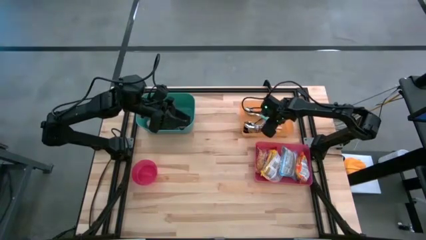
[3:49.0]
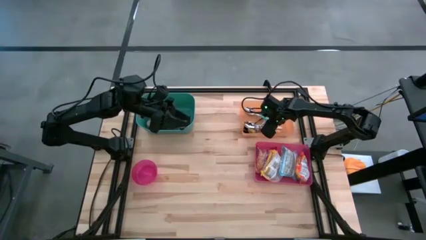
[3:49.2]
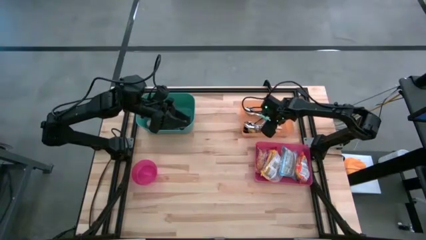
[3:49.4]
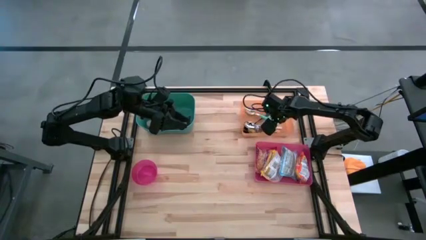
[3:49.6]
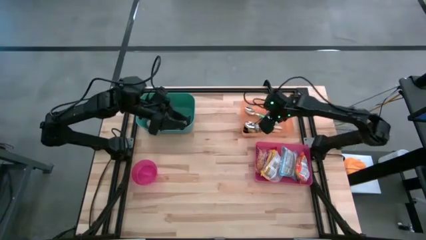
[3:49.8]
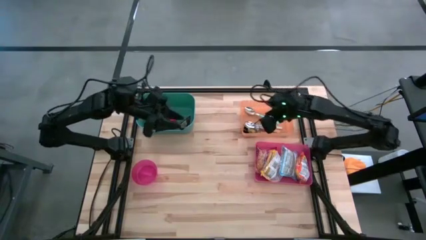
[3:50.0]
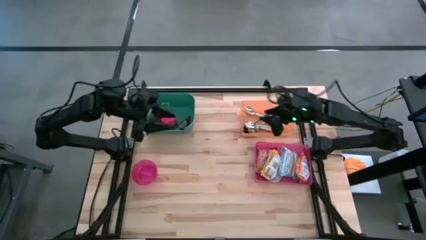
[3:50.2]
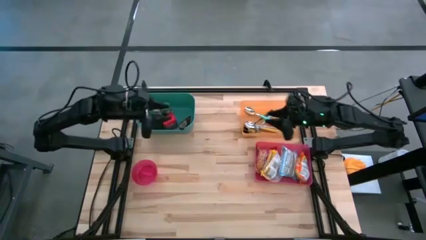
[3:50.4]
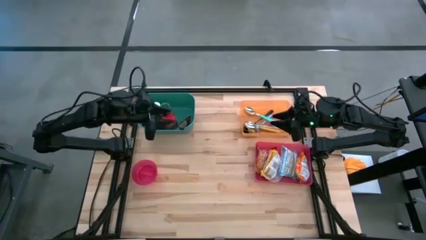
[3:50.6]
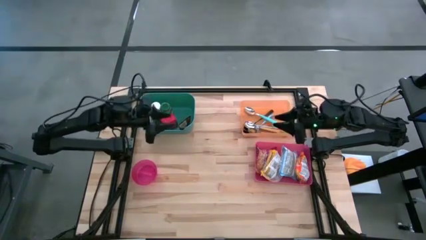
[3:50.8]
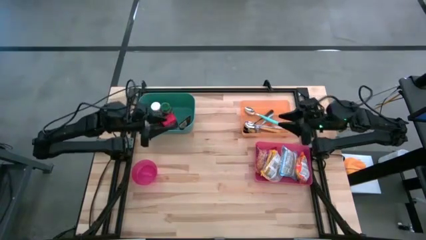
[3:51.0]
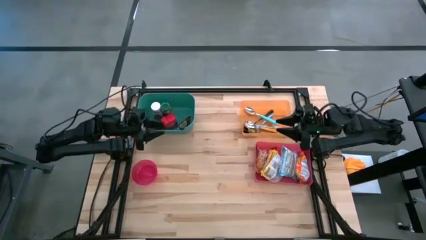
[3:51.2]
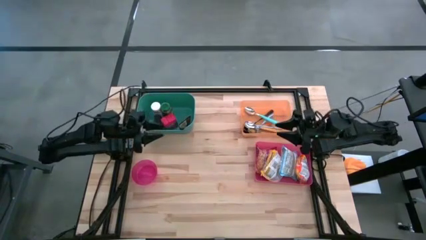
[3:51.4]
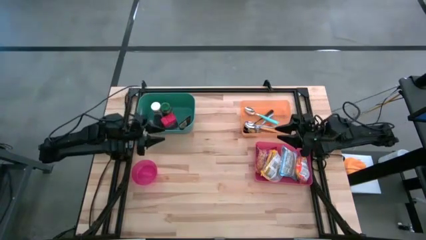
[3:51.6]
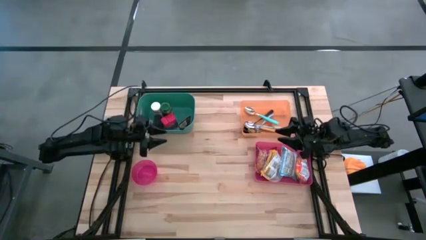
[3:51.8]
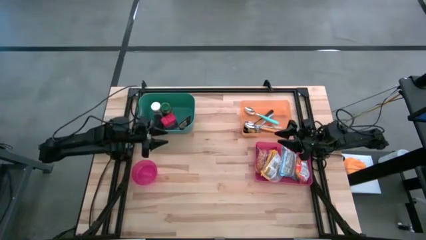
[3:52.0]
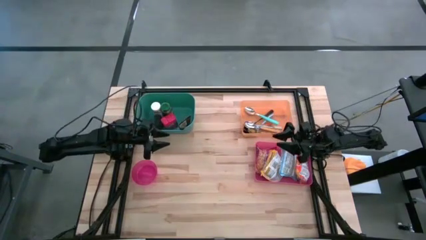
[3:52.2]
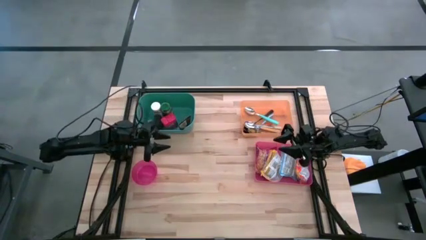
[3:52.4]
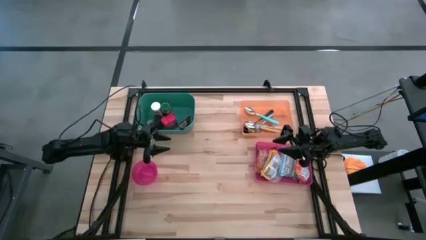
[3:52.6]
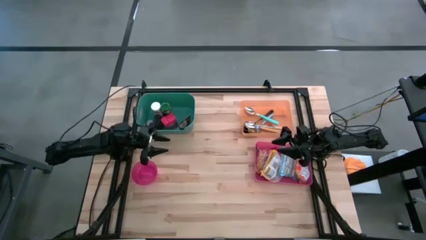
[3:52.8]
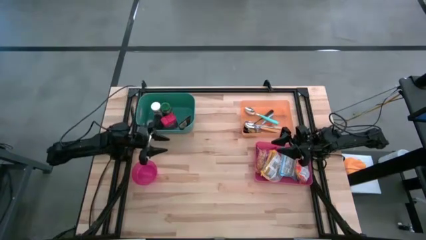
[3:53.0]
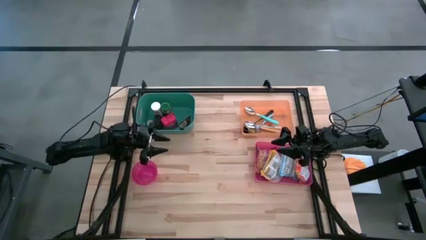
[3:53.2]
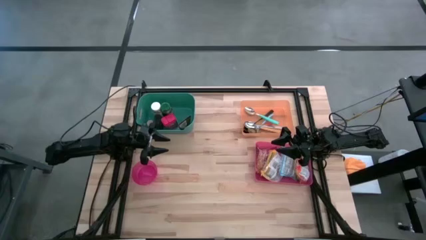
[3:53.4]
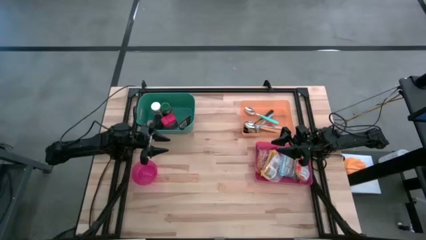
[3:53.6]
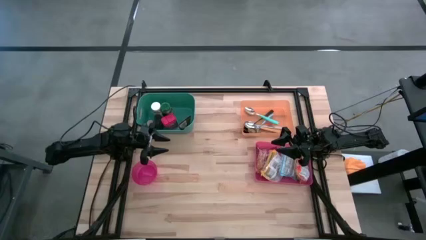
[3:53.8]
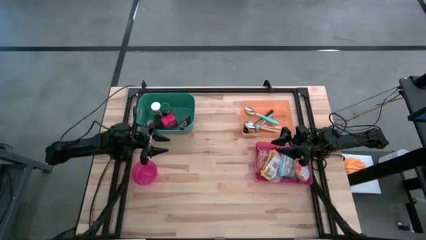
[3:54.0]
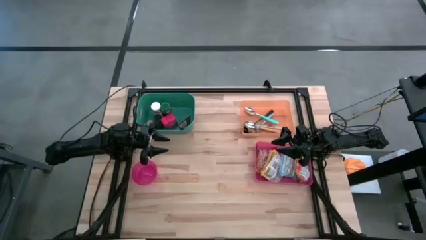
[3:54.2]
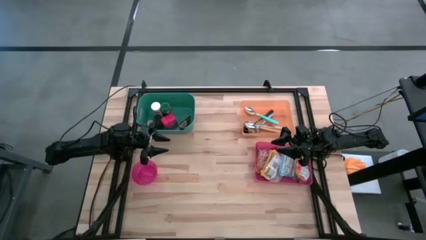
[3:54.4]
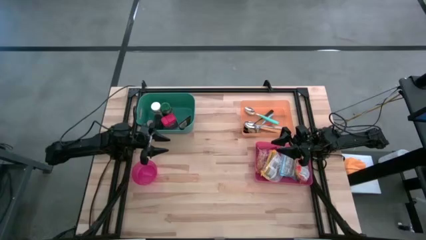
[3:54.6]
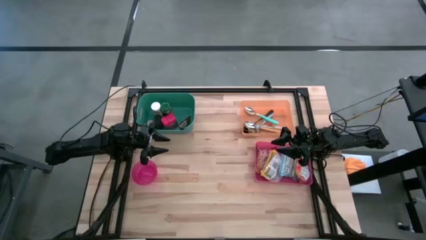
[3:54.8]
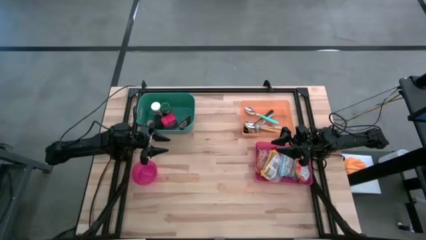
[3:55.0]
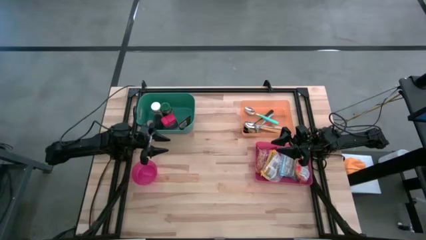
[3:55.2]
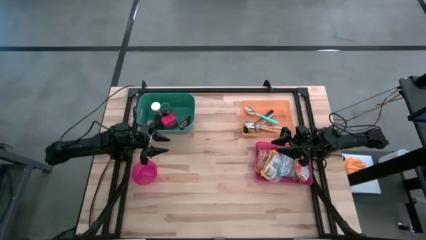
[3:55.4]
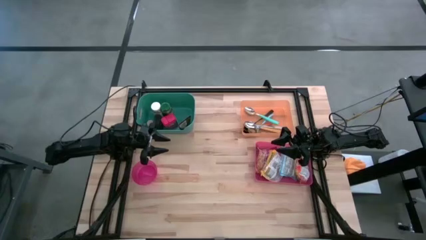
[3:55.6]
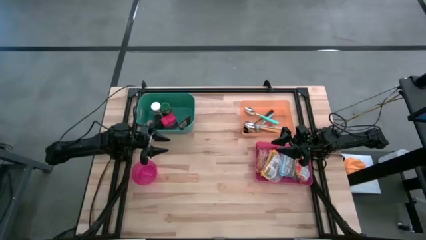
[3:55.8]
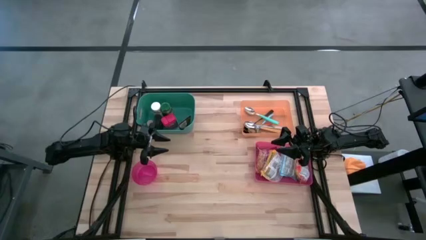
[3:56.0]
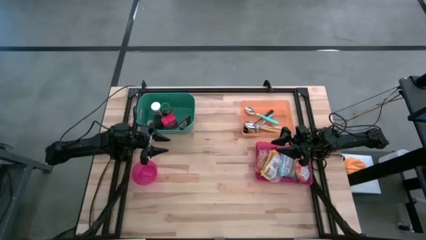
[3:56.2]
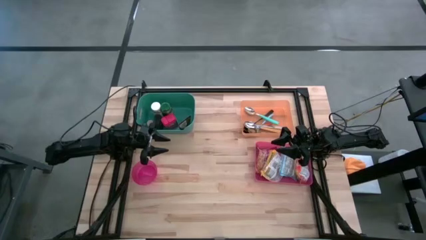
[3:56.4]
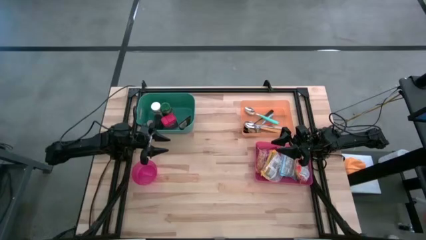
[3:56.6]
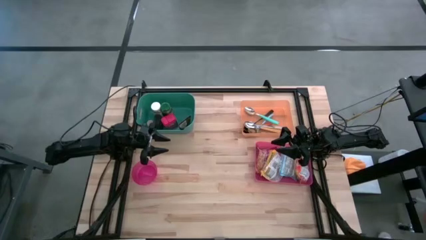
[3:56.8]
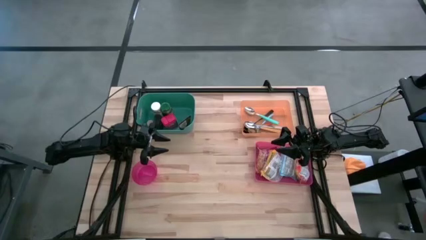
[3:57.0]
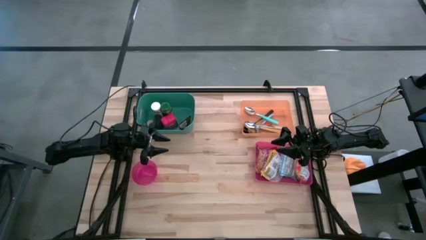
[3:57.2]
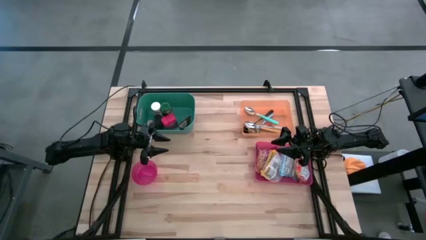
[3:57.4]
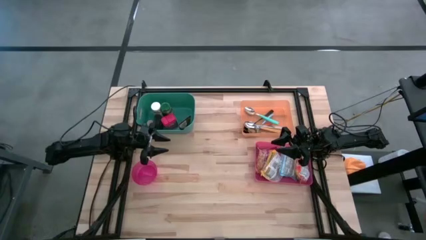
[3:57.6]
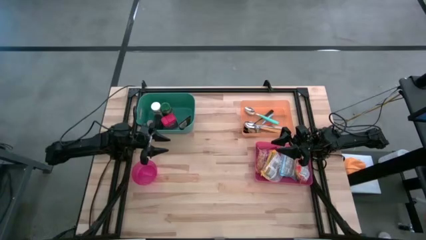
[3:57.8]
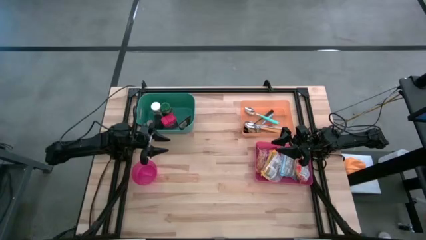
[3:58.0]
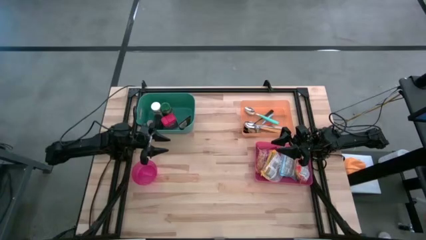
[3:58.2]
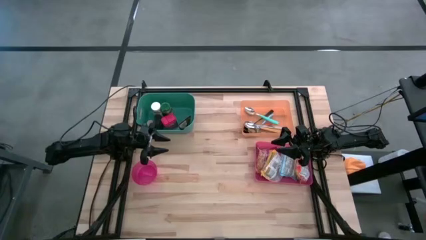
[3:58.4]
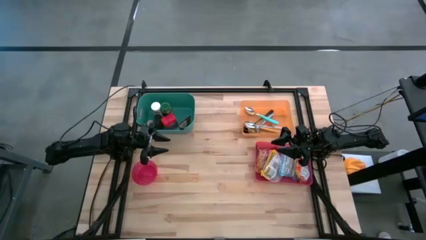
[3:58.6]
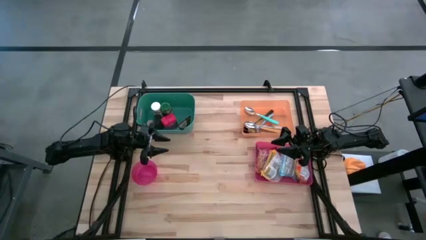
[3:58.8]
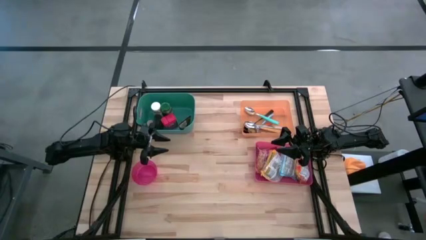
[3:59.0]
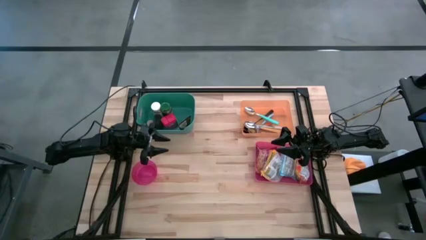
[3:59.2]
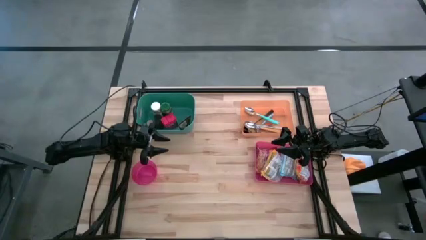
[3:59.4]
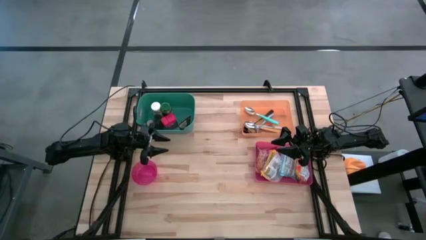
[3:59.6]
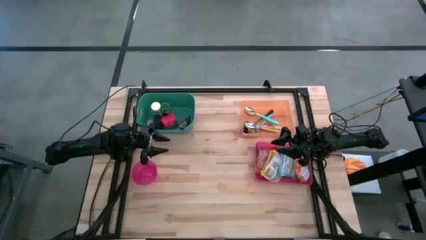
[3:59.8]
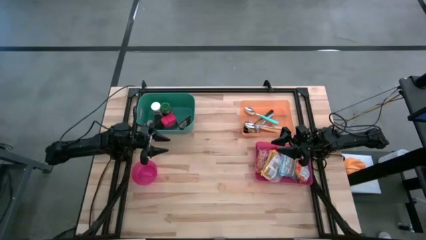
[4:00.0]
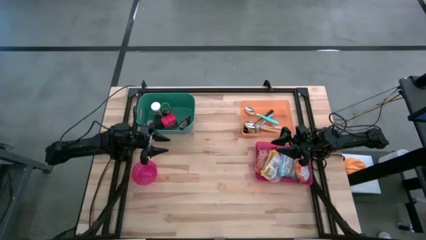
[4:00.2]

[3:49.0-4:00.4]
Return to Home Position
